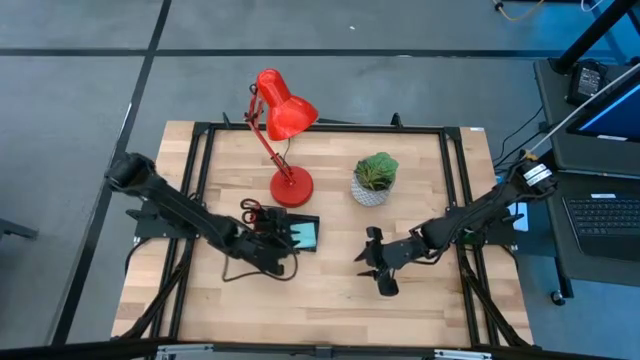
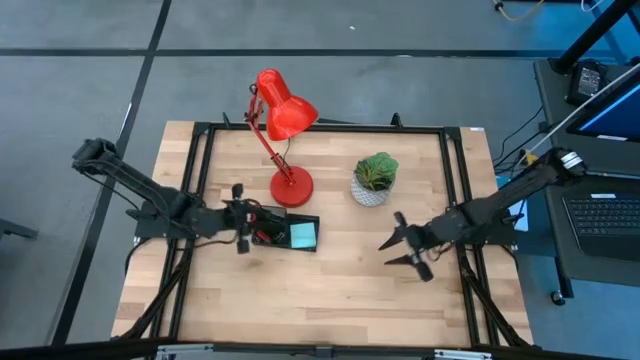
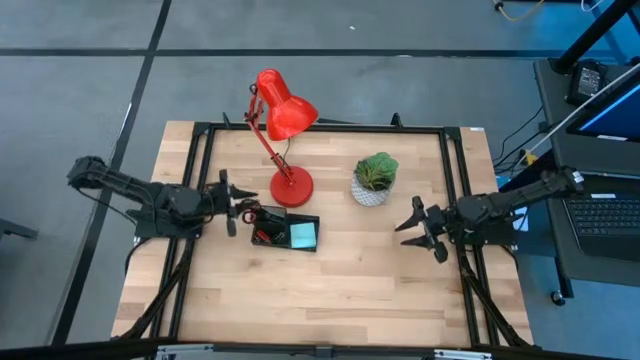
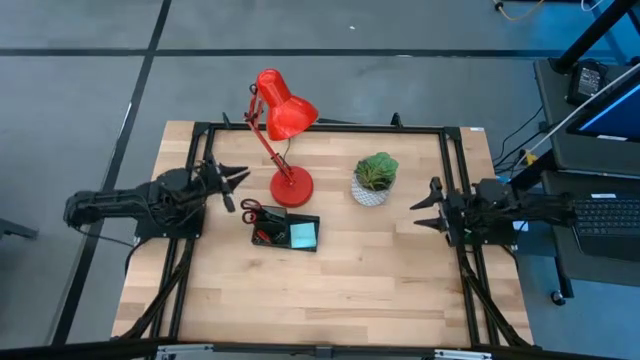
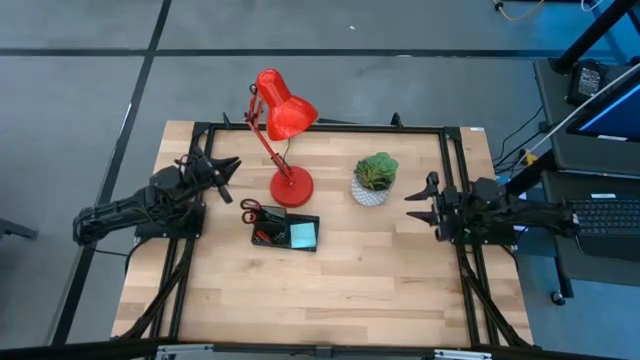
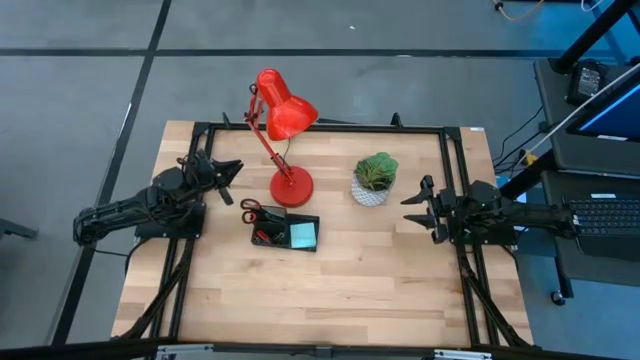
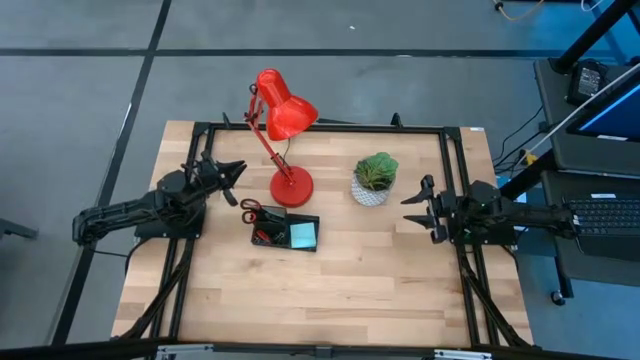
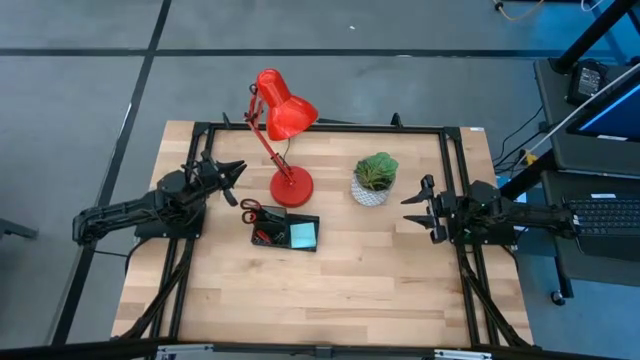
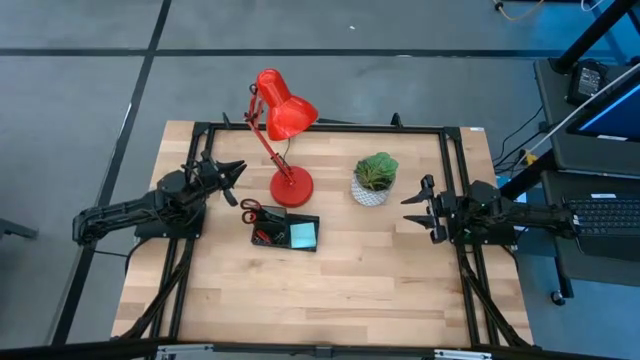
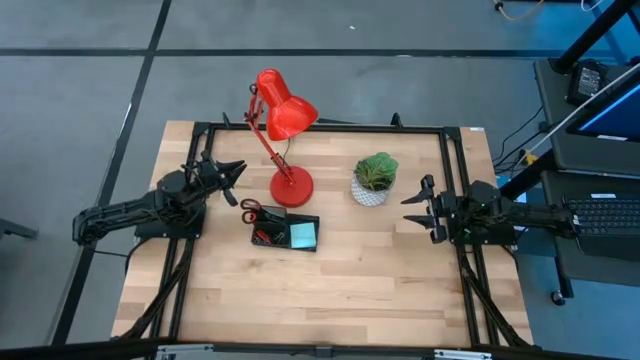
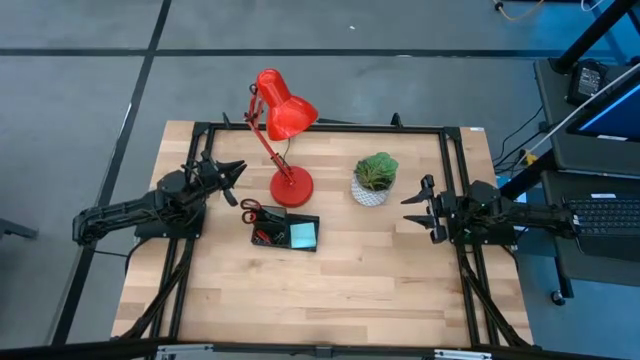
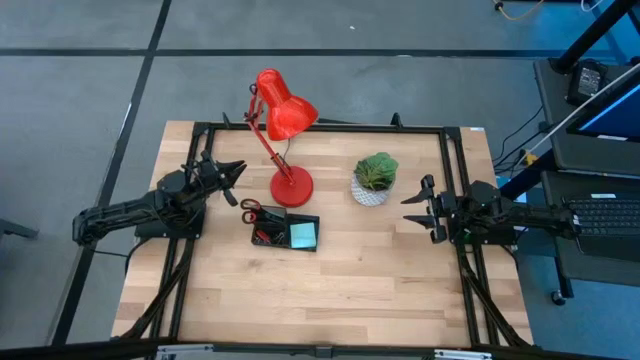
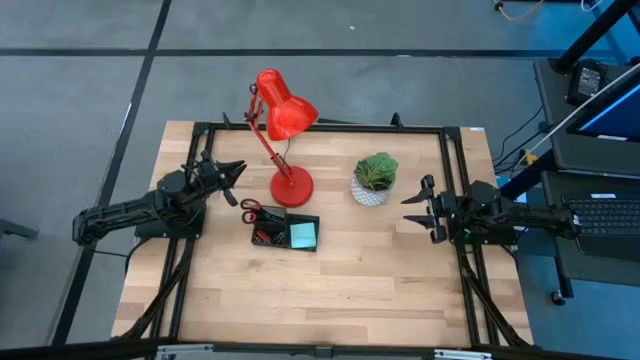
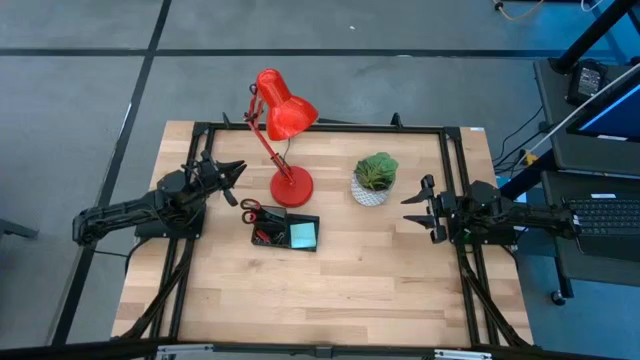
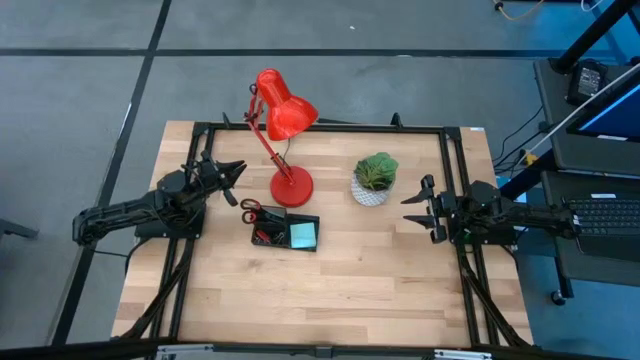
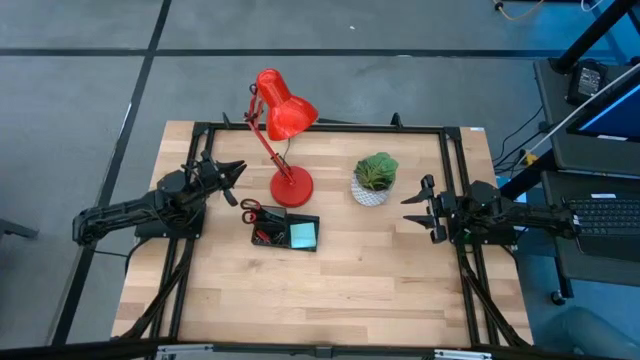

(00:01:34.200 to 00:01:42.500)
Task: Pick and place office supplies into organizer
Return to Home Position

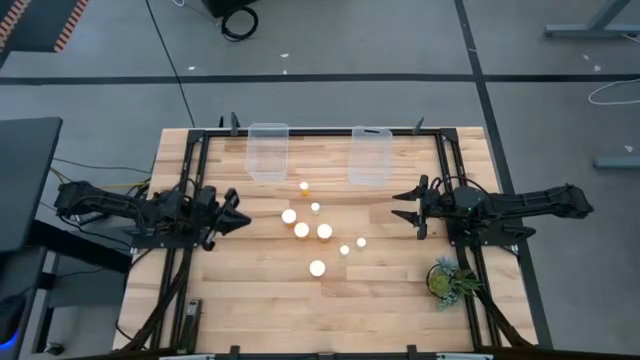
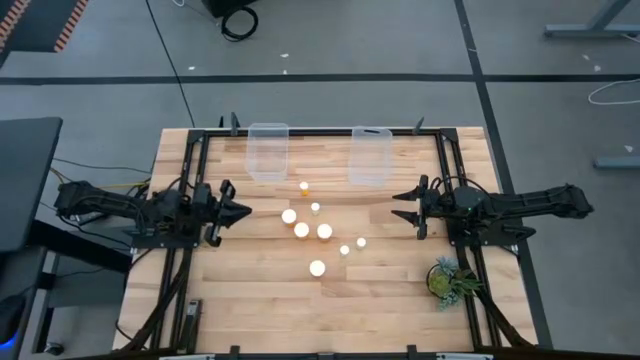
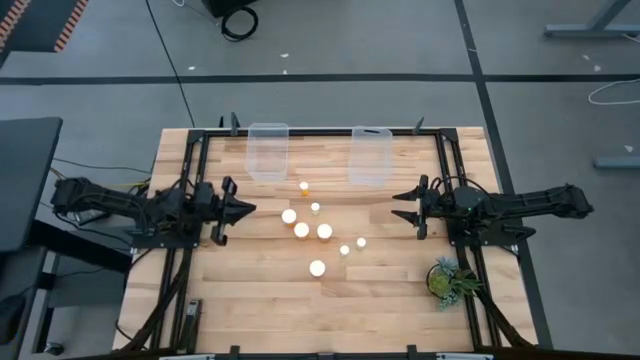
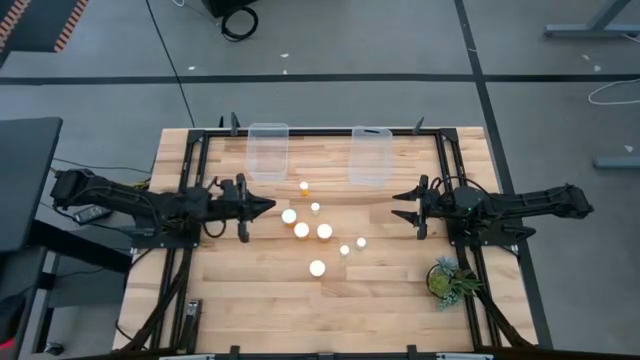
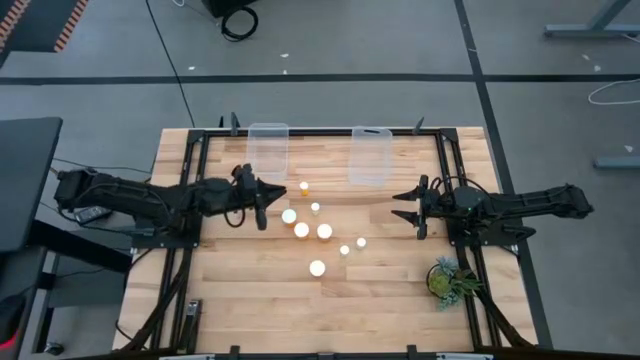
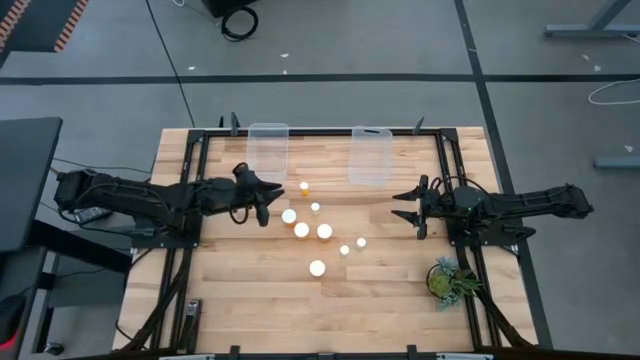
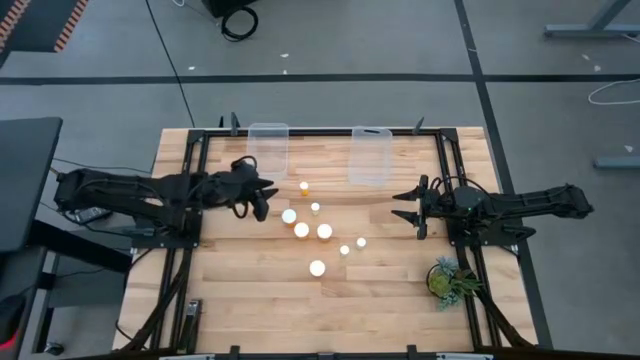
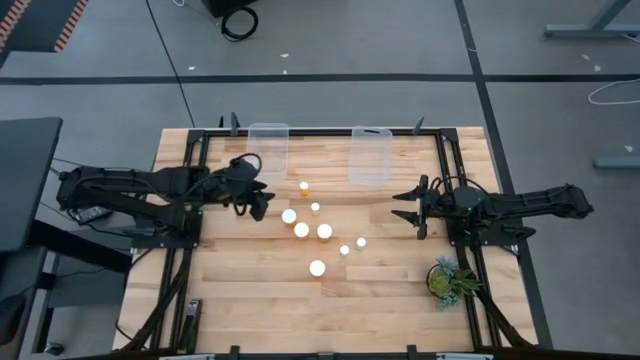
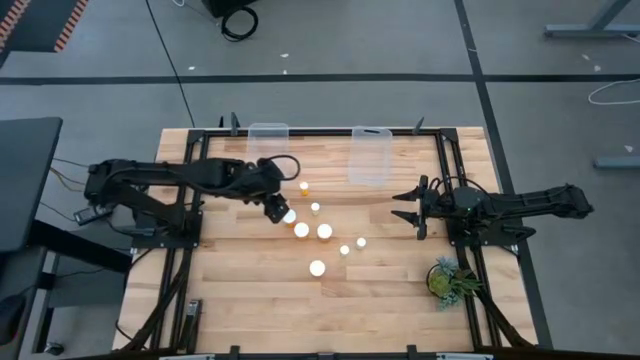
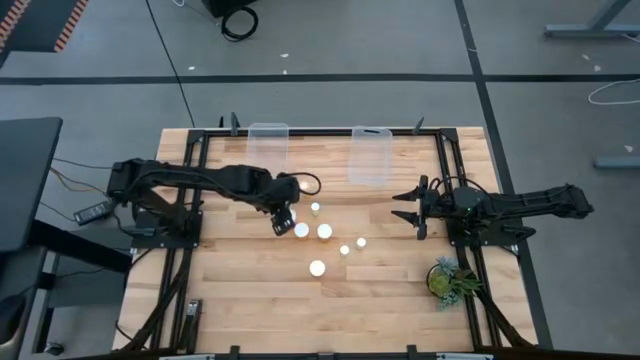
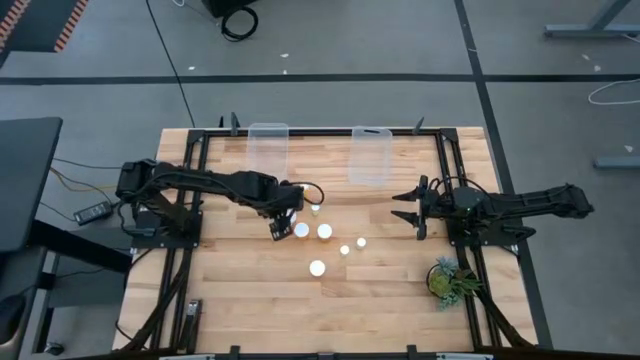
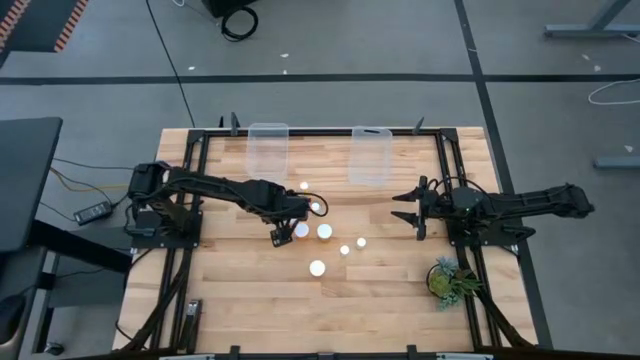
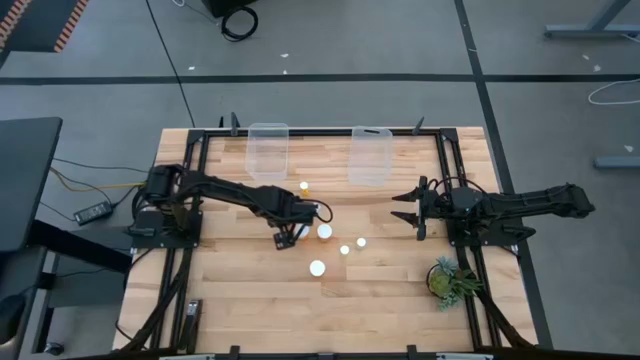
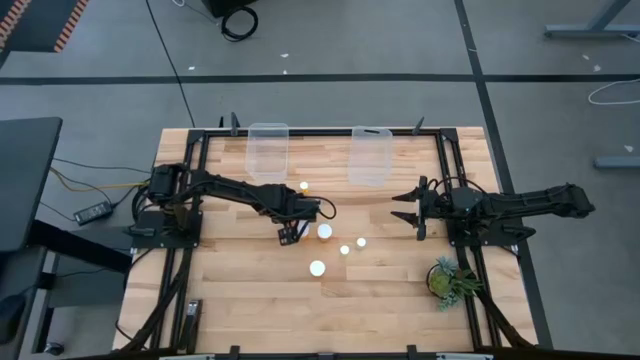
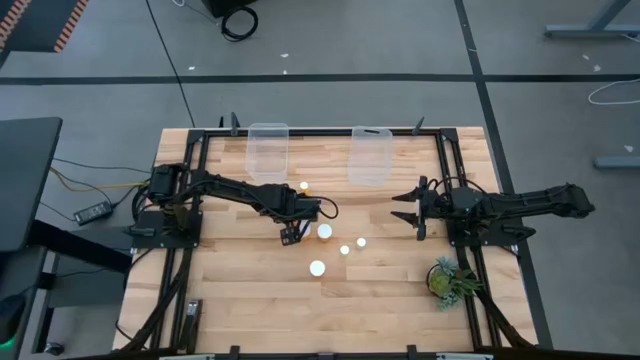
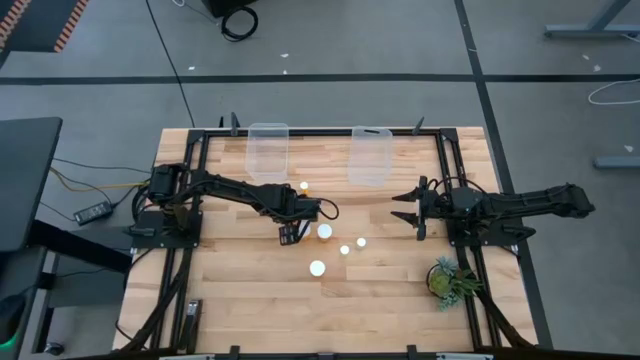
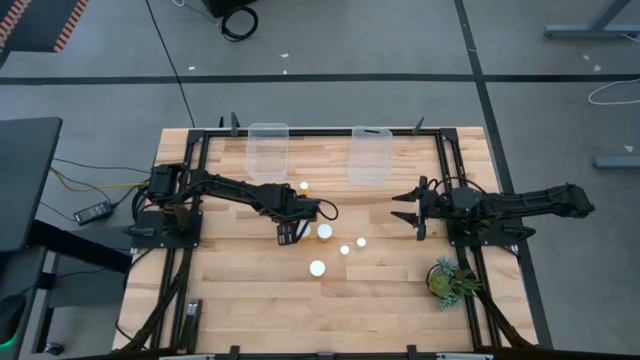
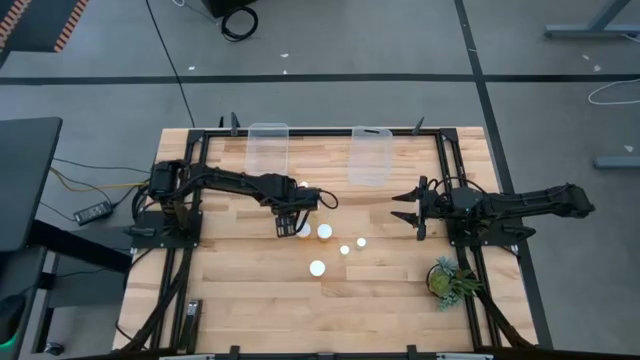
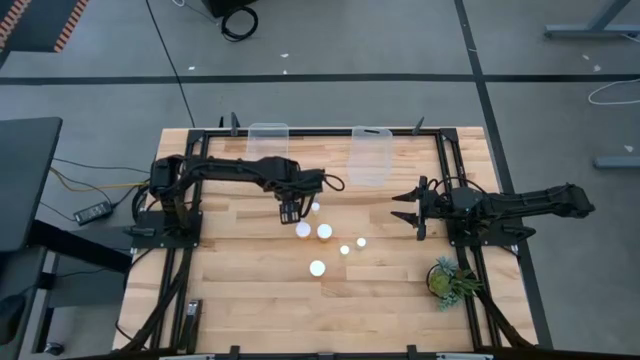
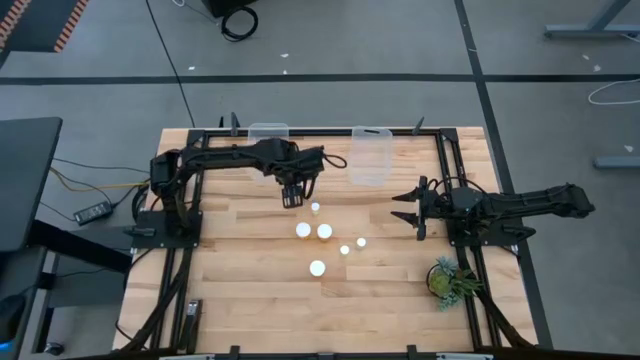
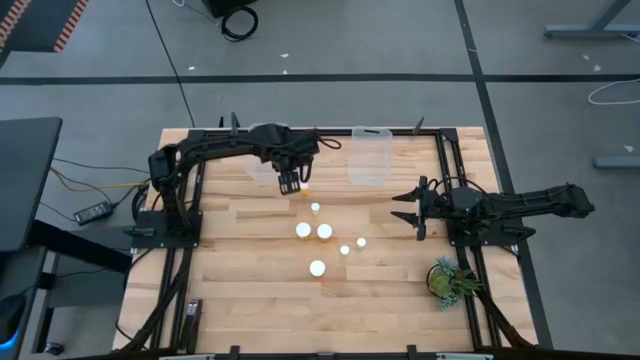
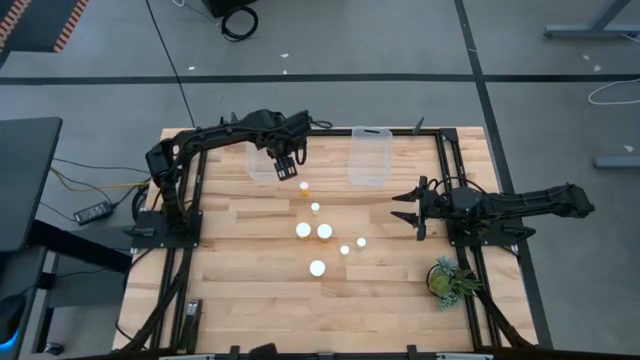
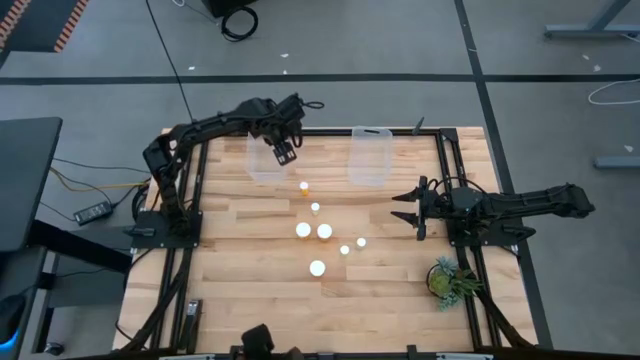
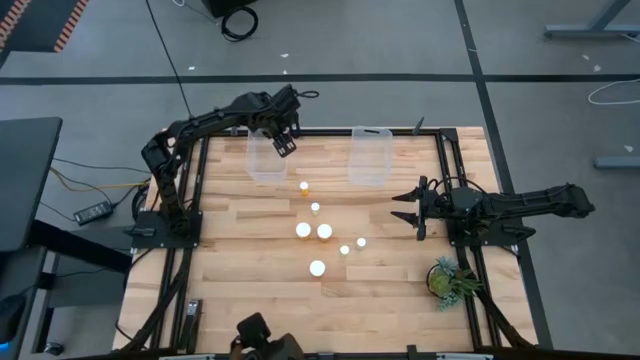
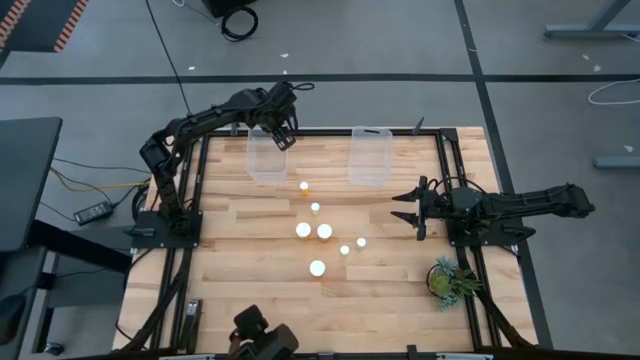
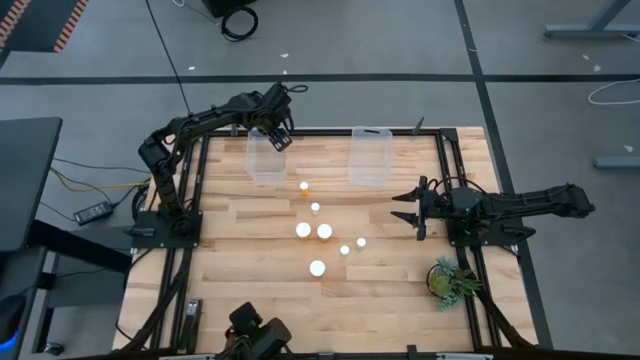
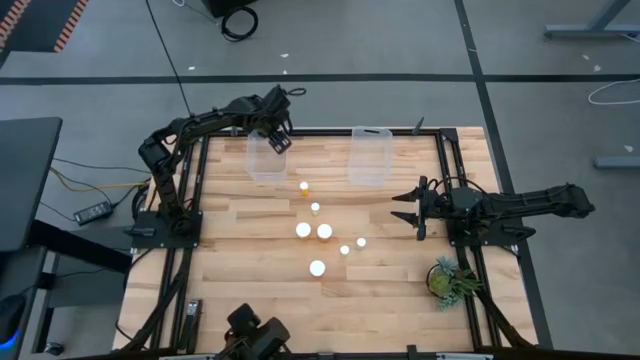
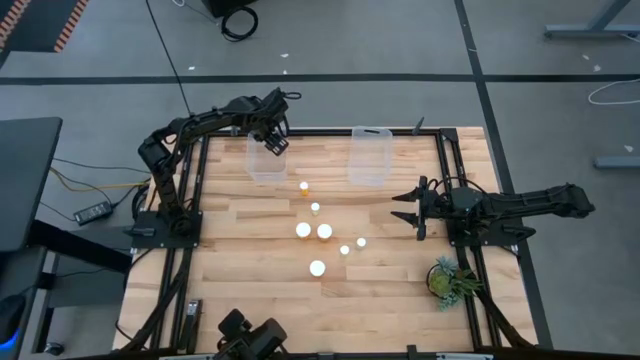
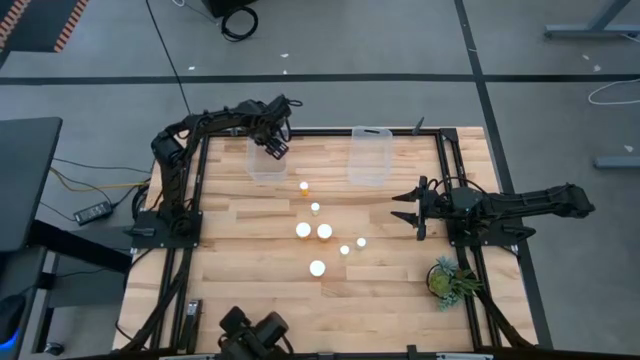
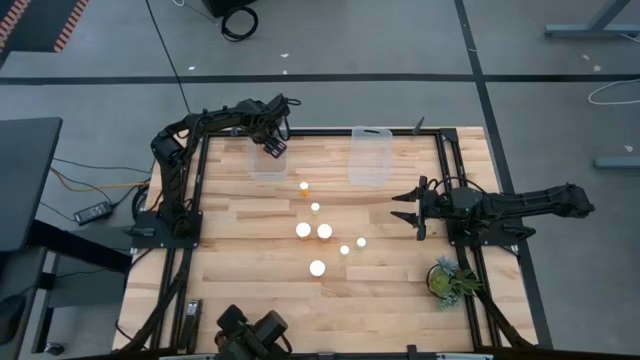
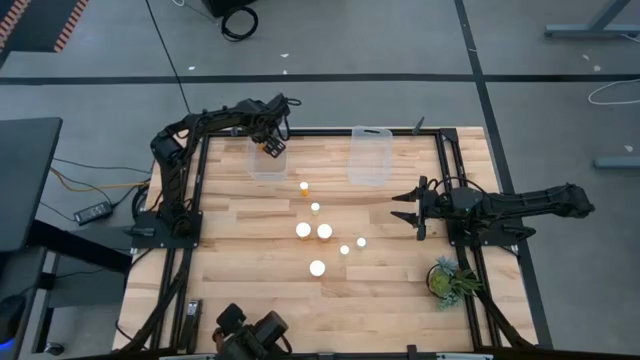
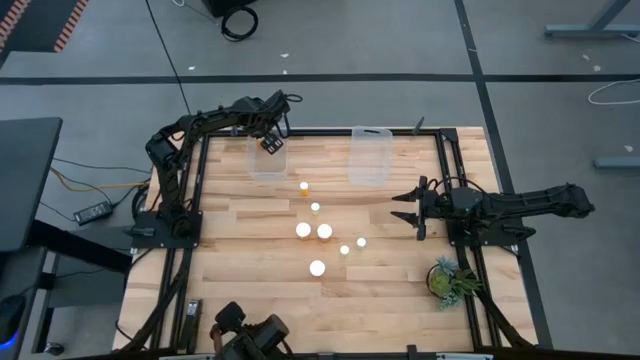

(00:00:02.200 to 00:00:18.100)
Task: Pick and place medicine bottles into bin by pill shape (circle, oval)
Put the orange capsule bottle into the left transparent bin
